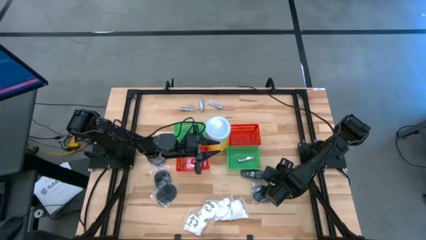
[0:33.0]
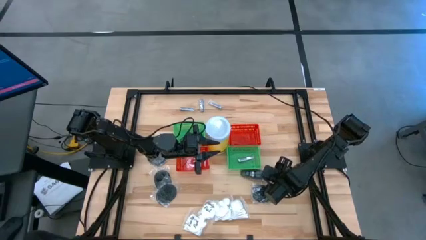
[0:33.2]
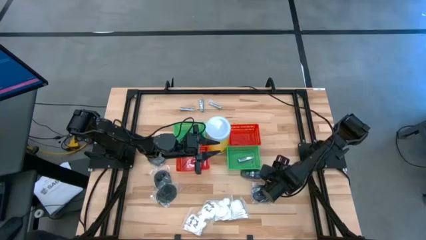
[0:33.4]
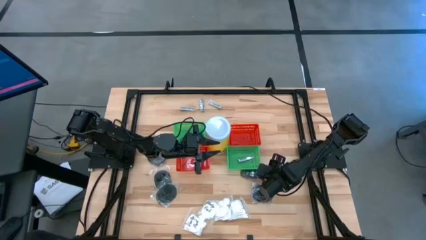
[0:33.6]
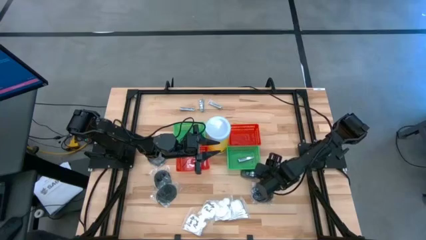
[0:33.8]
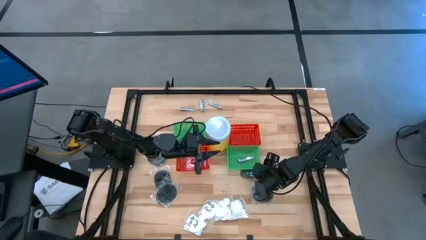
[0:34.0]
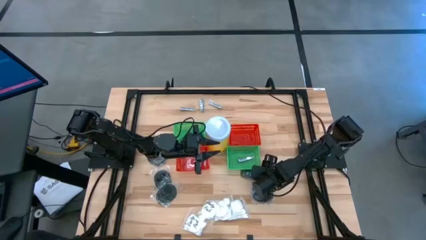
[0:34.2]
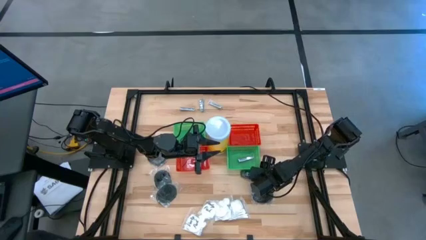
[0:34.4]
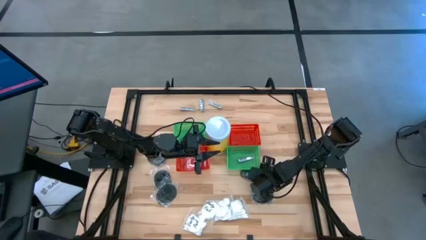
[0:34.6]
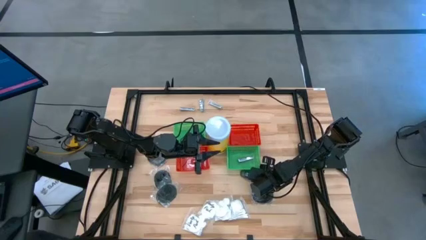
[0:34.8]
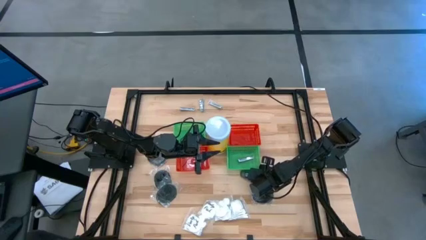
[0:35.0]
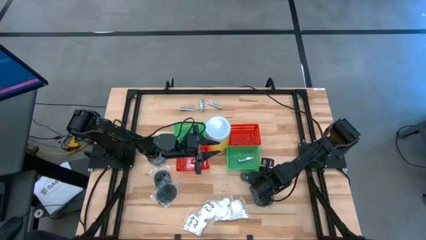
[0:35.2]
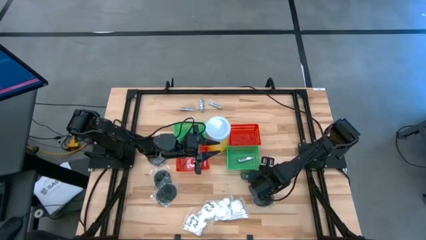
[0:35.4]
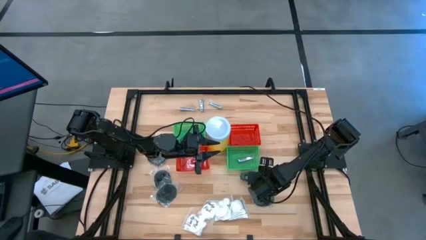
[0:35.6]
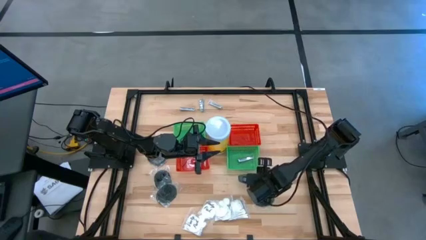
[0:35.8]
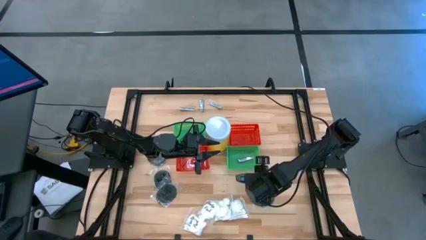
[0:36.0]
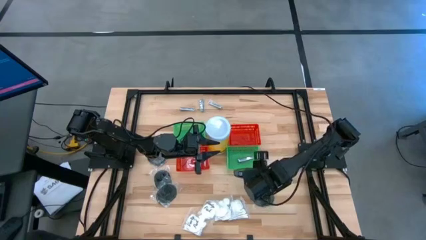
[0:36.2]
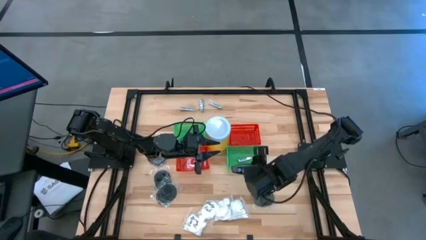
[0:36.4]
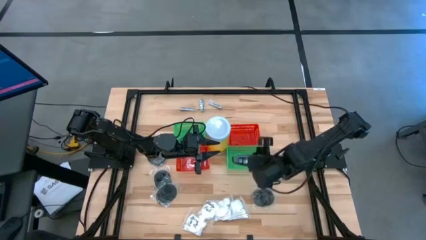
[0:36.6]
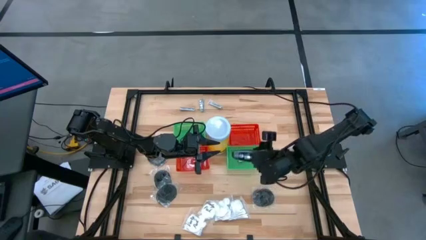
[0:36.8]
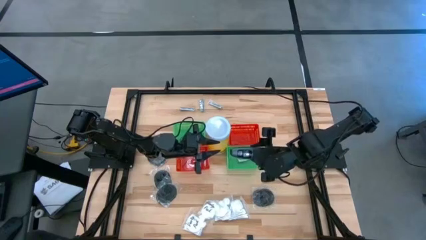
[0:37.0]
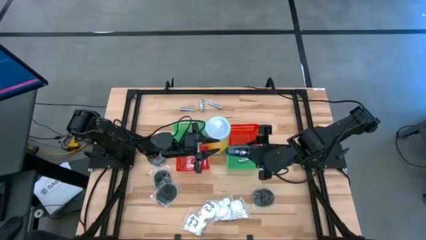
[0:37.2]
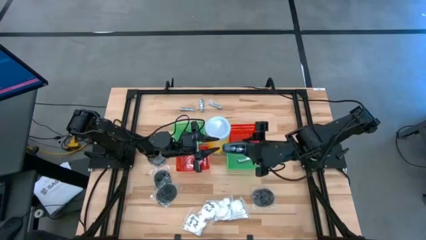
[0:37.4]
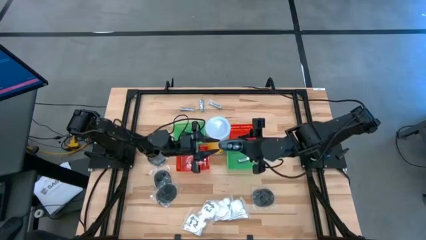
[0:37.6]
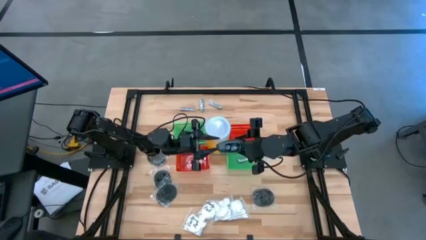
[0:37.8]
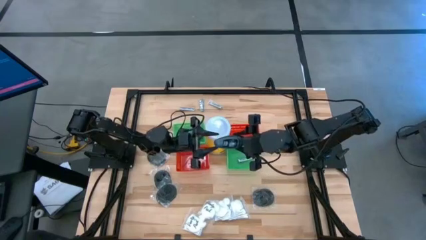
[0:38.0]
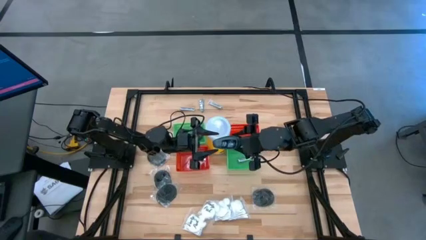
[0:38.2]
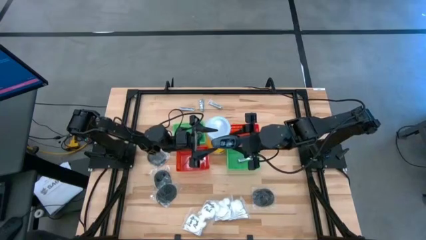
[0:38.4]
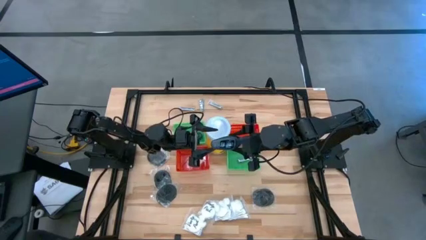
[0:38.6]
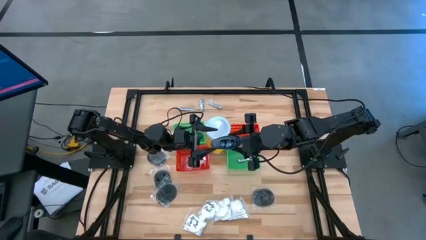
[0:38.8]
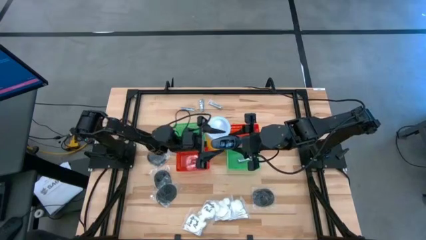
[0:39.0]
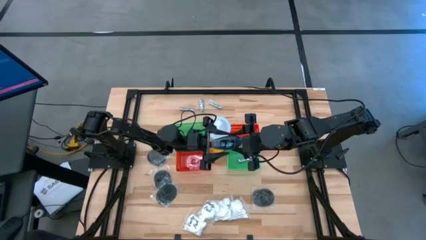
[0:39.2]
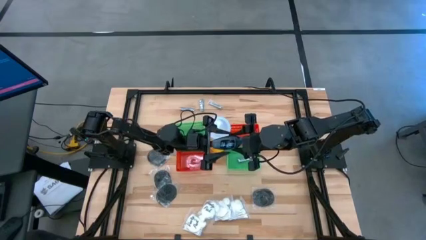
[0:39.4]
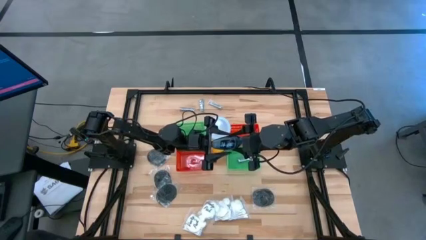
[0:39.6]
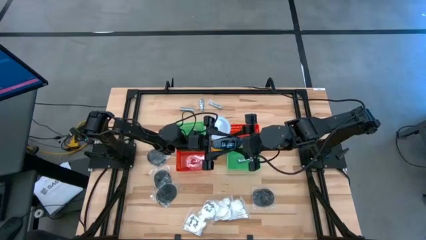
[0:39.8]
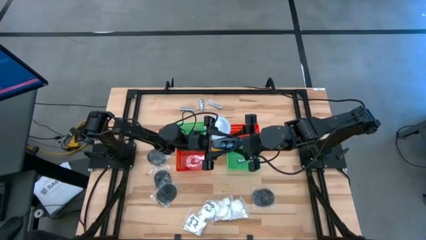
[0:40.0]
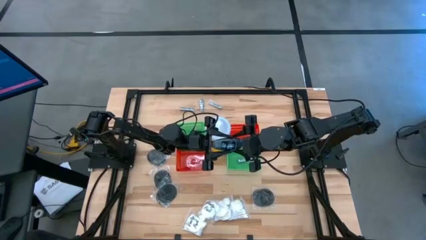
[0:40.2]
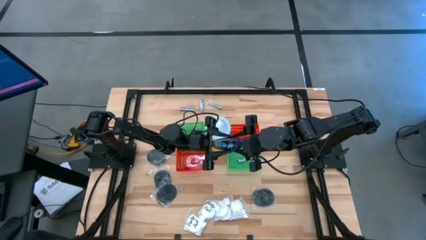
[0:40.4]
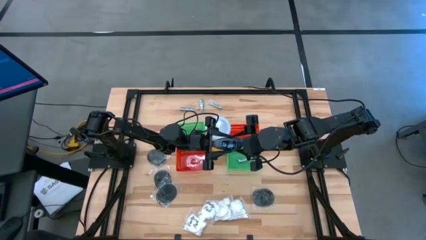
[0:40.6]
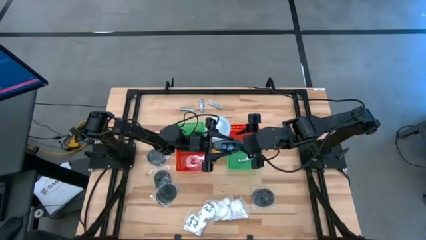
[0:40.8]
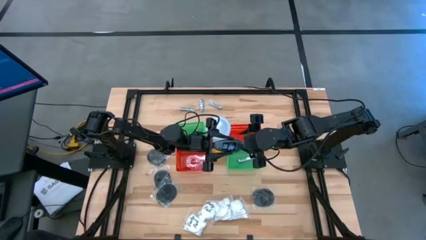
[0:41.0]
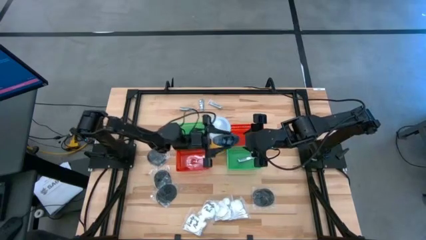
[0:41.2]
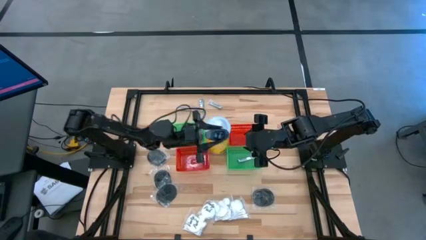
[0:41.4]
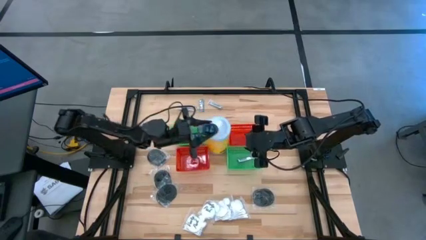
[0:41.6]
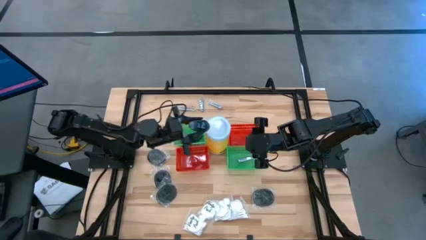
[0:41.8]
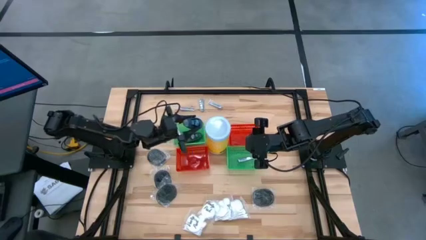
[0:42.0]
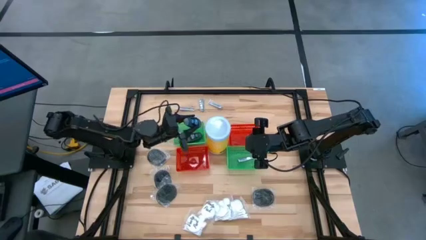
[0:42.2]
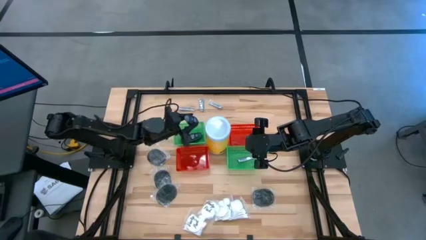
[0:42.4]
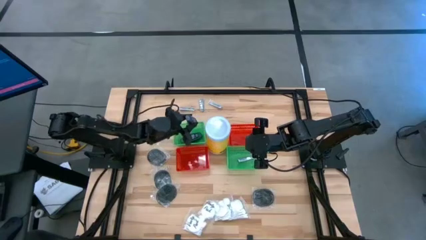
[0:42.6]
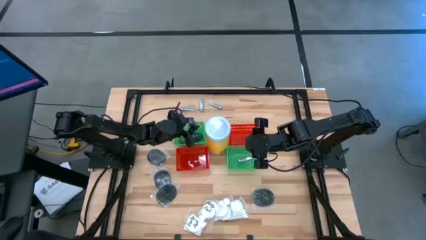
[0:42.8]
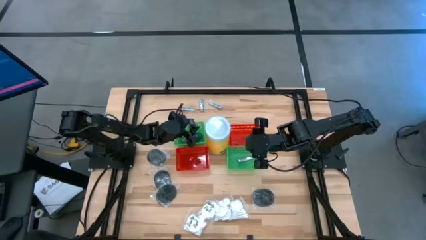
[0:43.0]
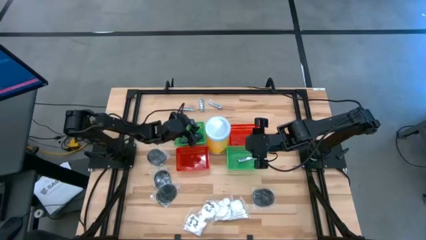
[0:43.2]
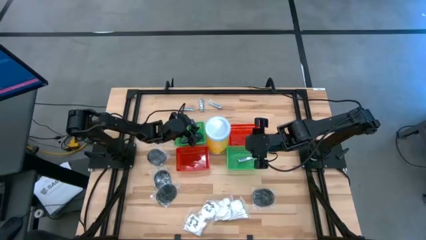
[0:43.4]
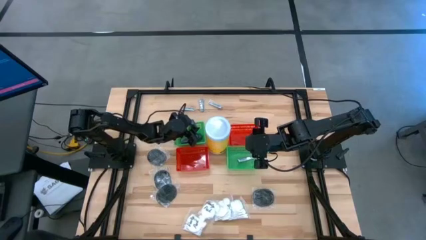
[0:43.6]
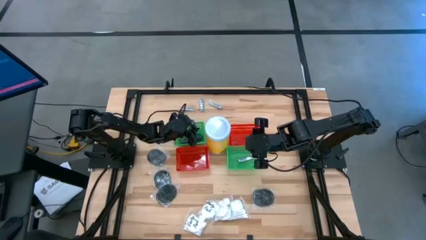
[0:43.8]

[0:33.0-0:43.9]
Task: Pick & Place Travel size toiletries
Put the black deodorant into the left green bin
